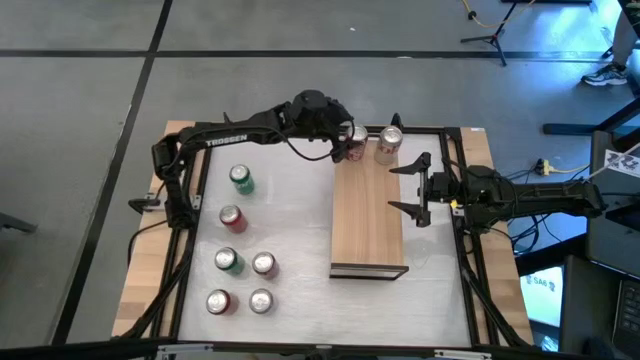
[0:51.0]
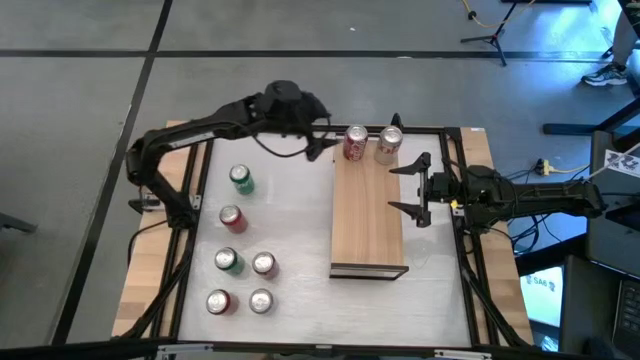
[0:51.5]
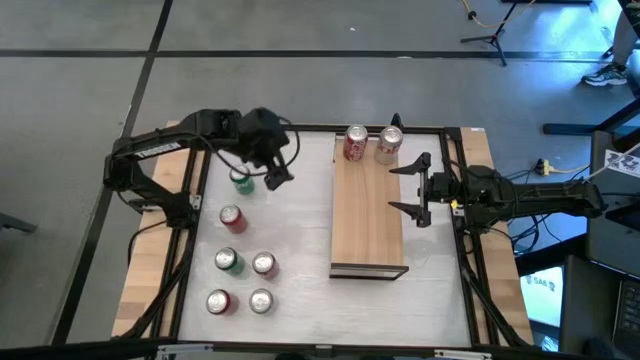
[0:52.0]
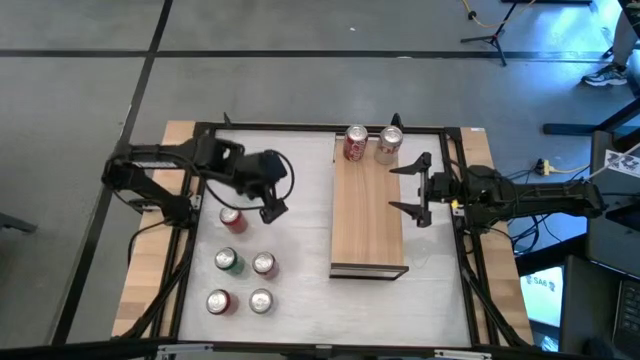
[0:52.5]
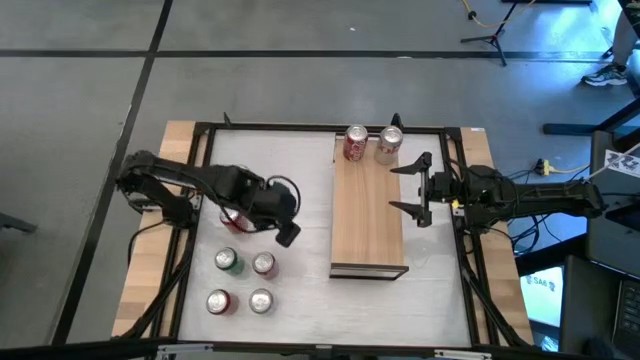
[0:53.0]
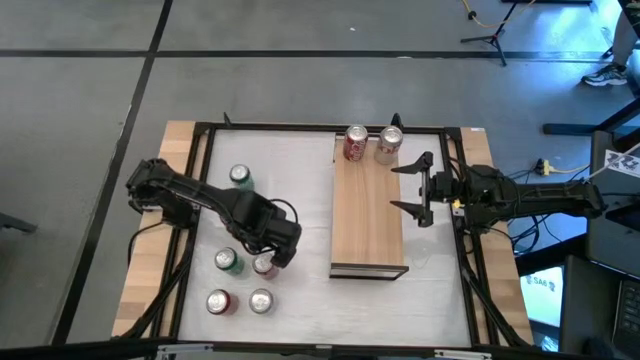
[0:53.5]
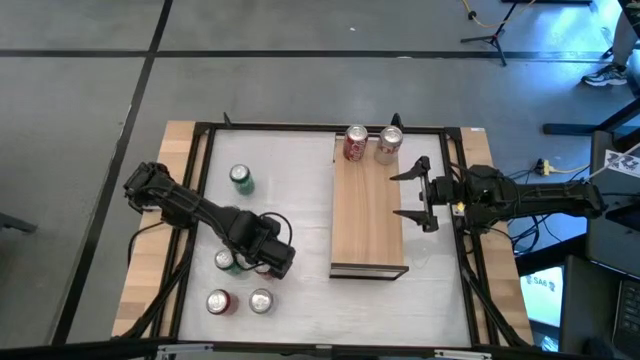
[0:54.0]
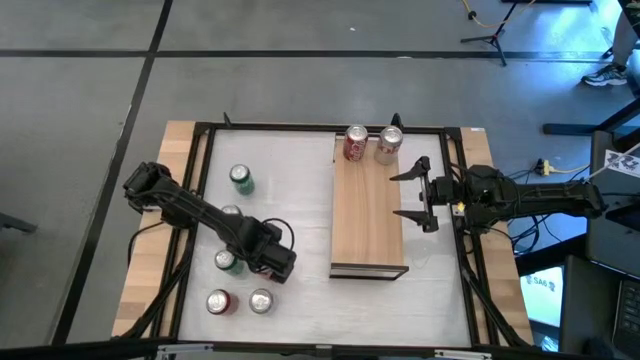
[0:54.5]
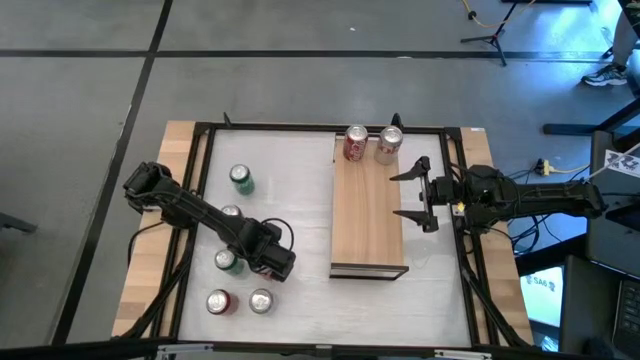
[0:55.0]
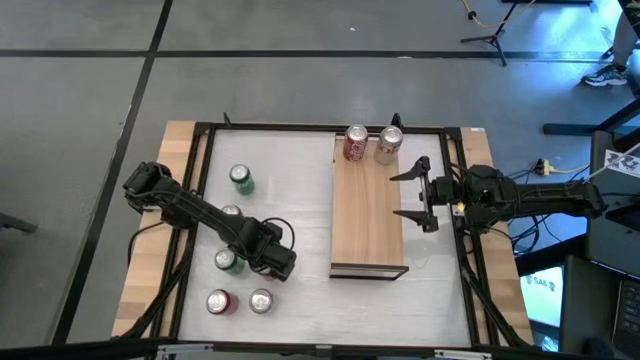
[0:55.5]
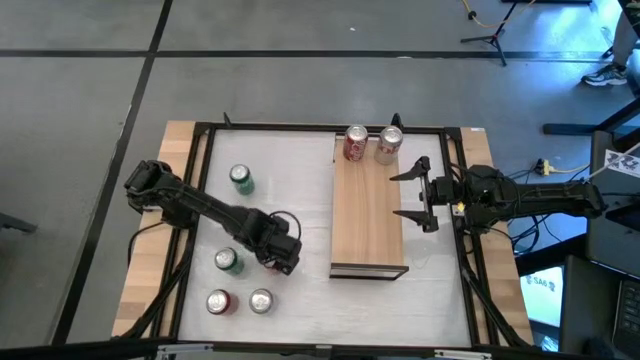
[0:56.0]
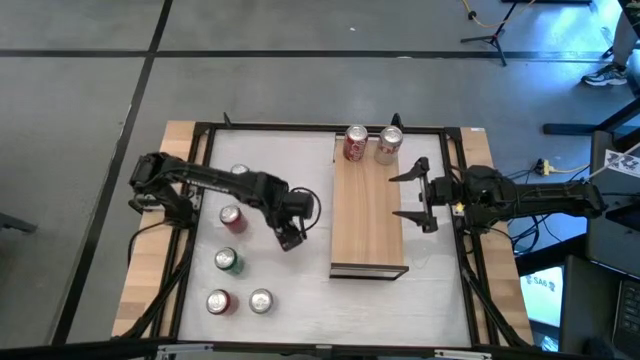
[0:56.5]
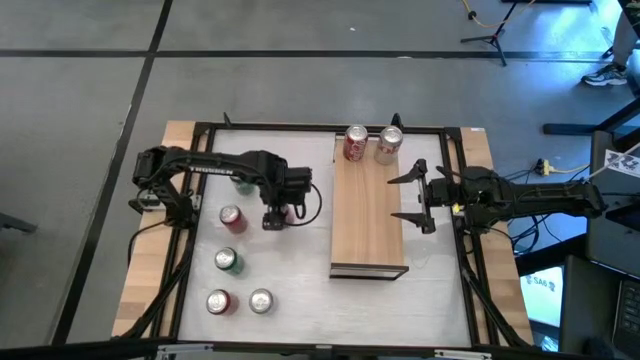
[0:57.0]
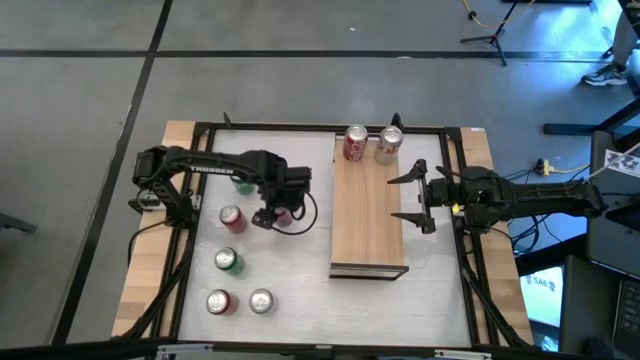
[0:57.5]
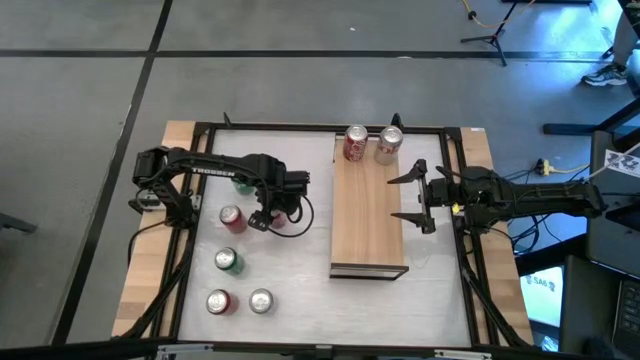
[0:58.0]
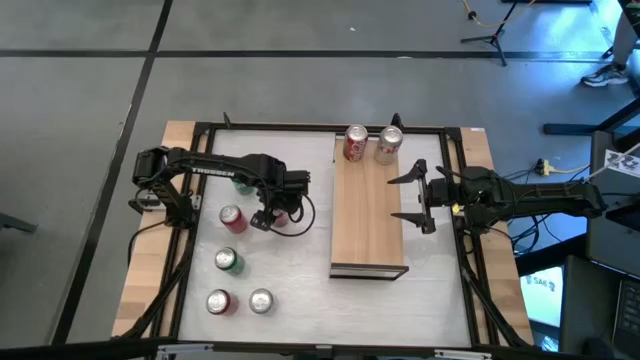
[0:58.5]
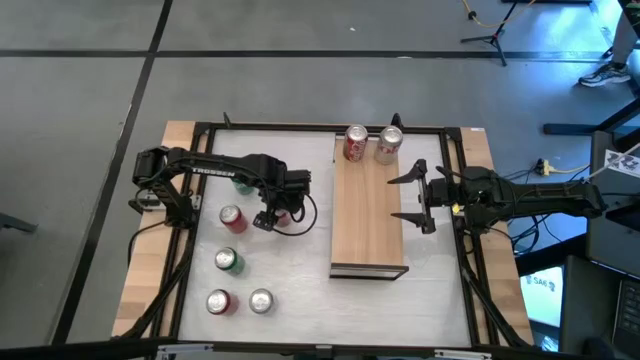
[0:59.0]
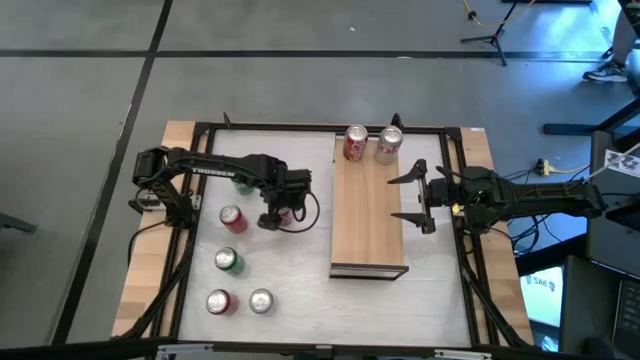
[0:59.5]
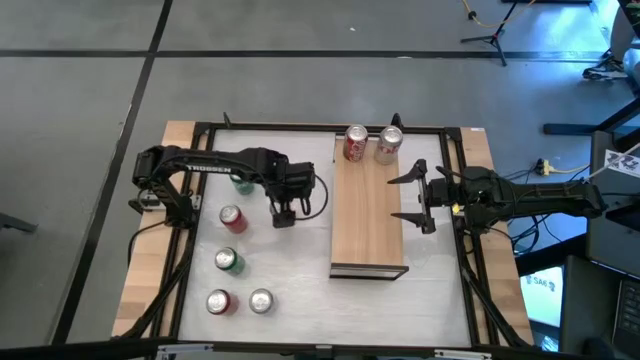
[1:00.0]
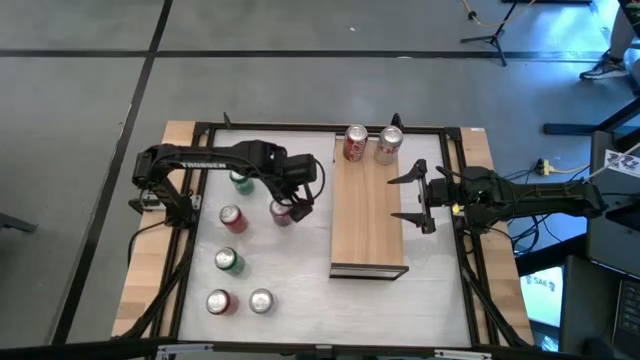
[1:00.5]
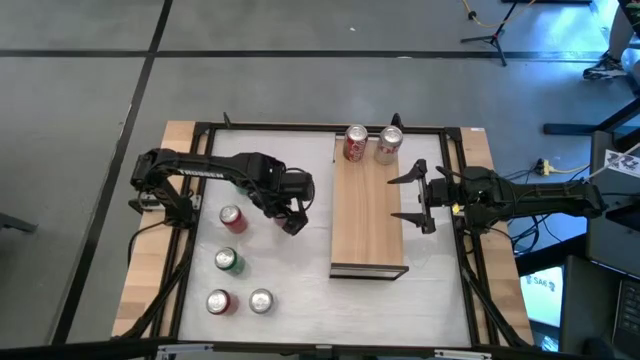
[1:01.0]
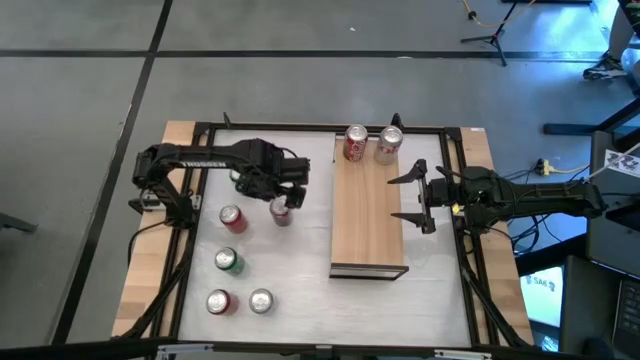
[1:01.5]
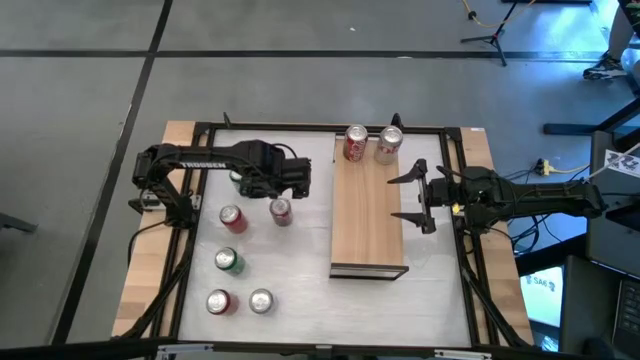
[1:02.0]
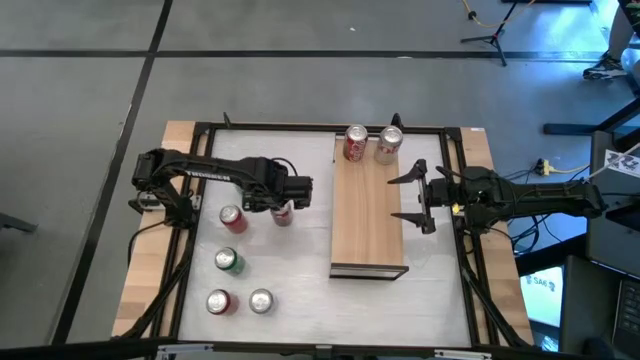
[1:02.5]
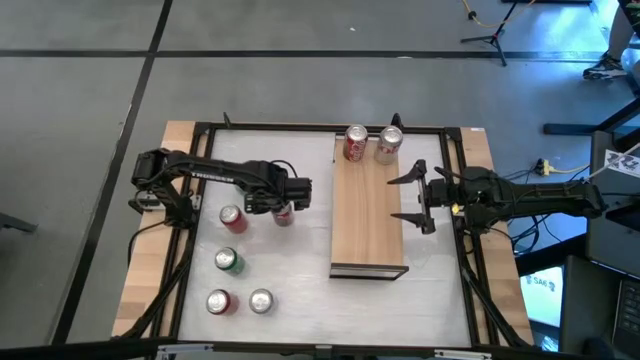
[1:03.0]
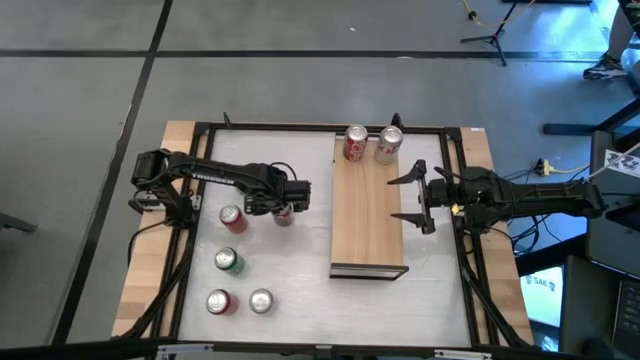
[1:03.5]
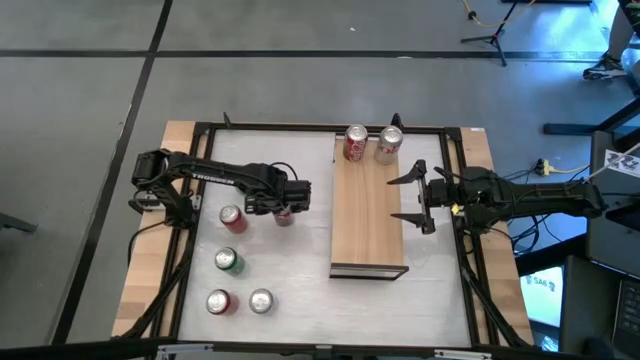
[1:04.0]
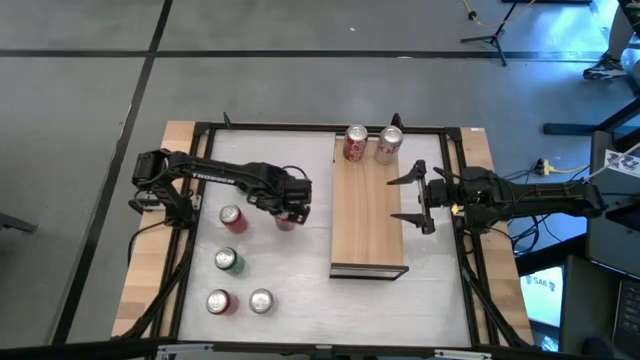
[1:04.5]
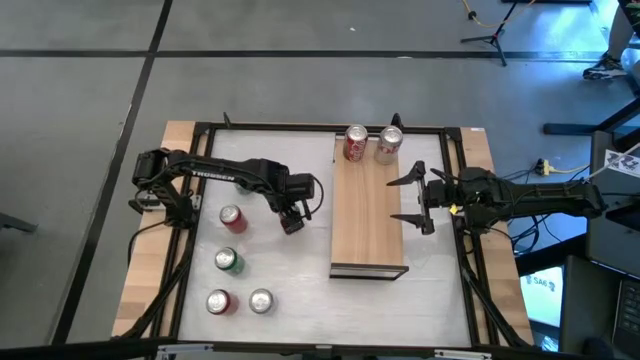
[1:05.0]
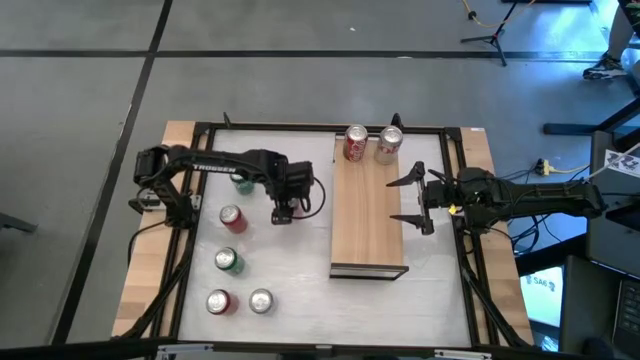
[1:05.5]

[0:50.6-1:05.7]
Task: Place canned beverage on shelf
Put the red white soda can on the shelf aligned with the other red white soda can

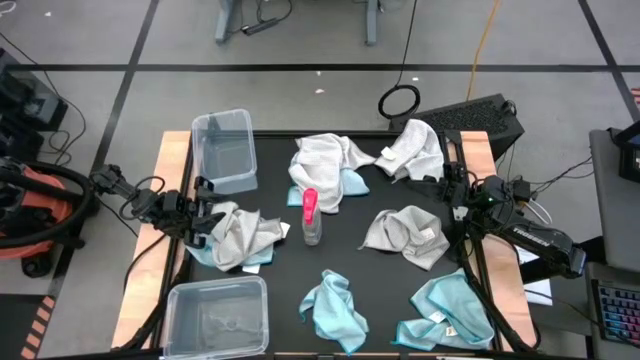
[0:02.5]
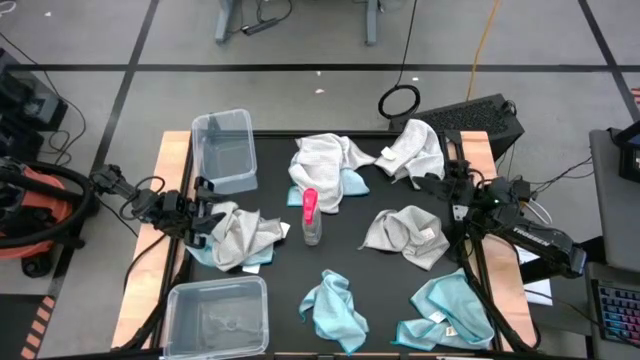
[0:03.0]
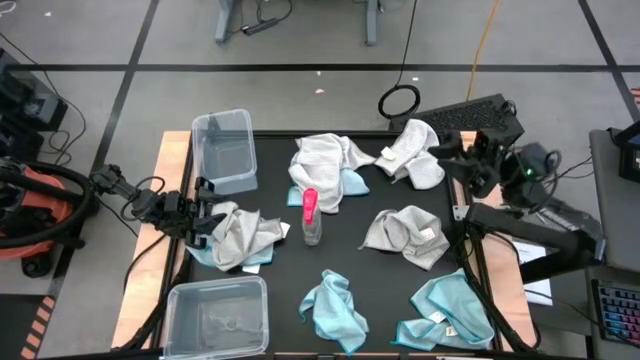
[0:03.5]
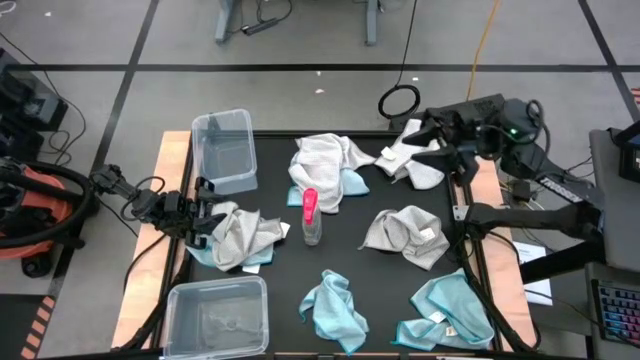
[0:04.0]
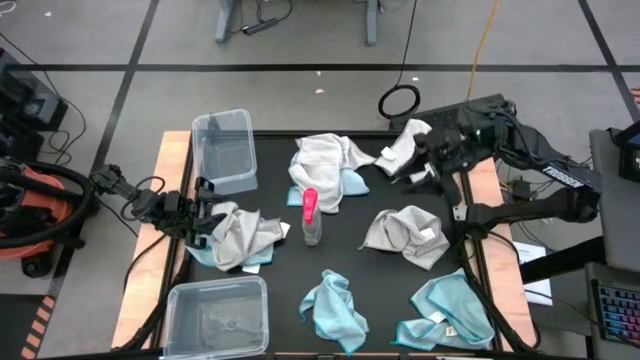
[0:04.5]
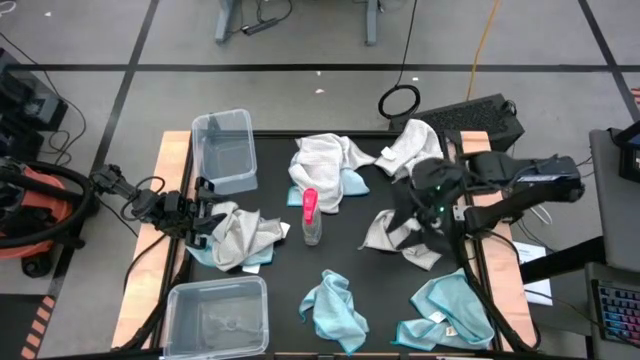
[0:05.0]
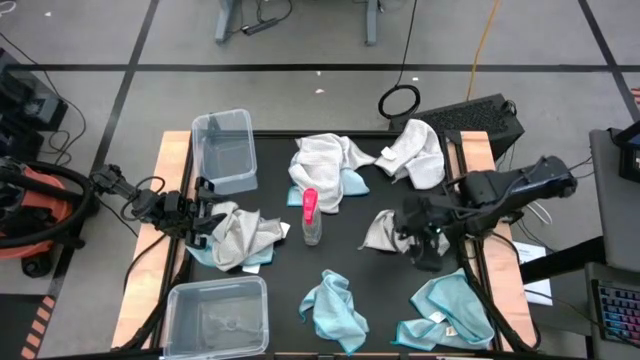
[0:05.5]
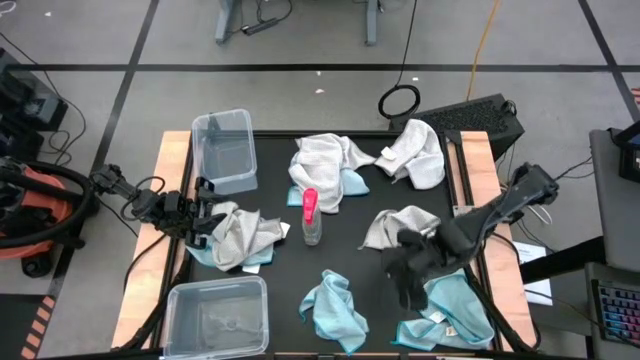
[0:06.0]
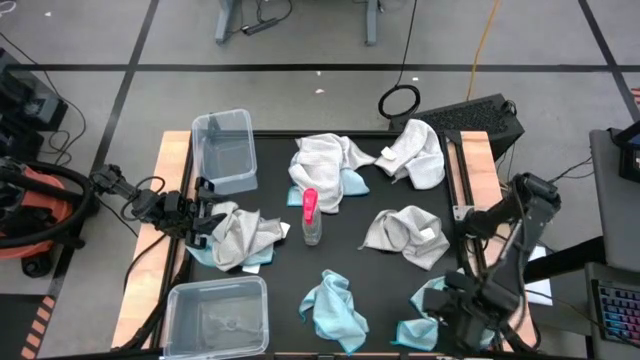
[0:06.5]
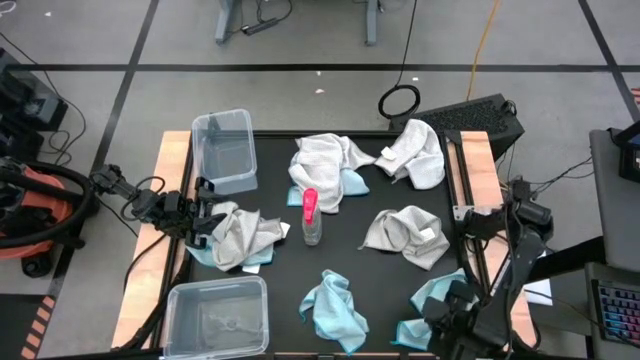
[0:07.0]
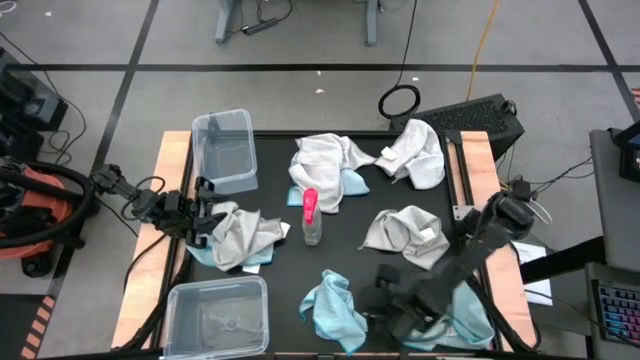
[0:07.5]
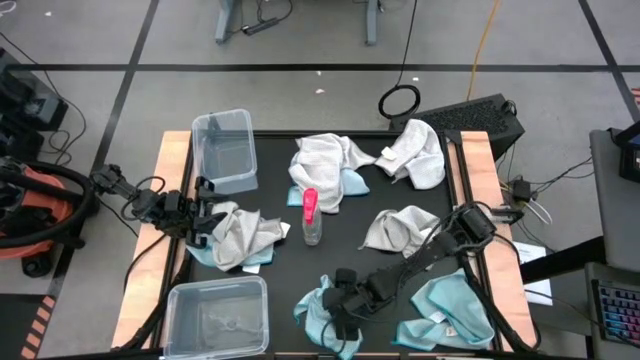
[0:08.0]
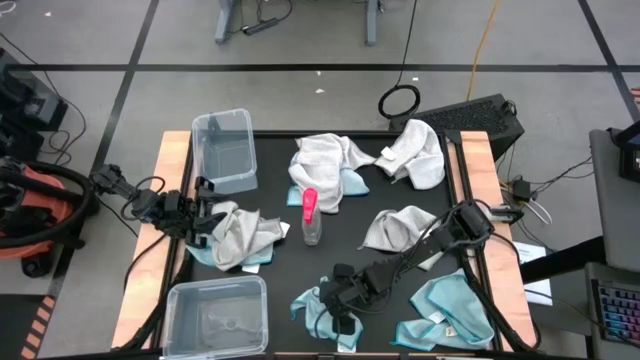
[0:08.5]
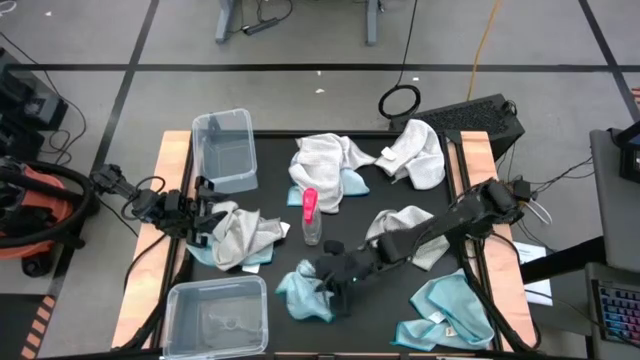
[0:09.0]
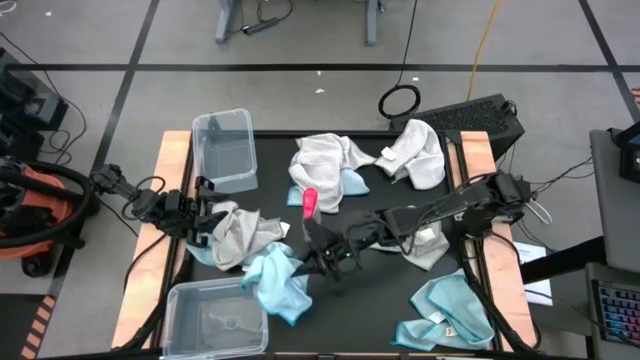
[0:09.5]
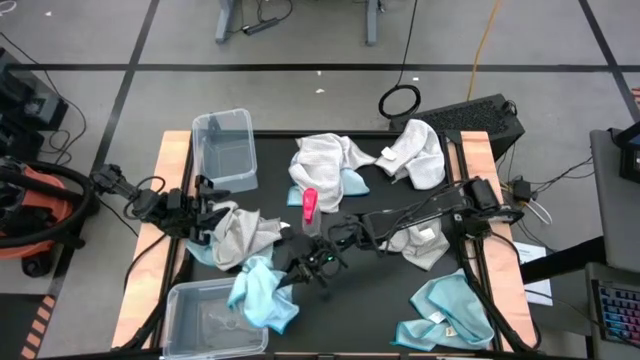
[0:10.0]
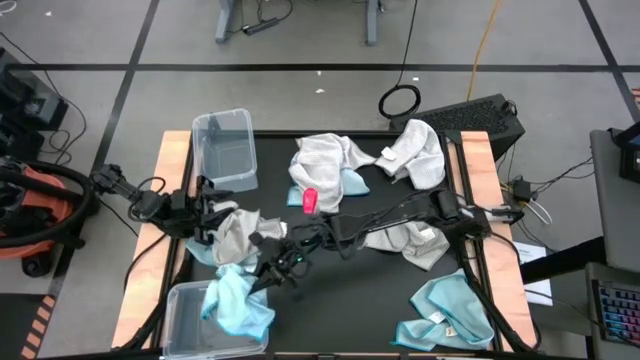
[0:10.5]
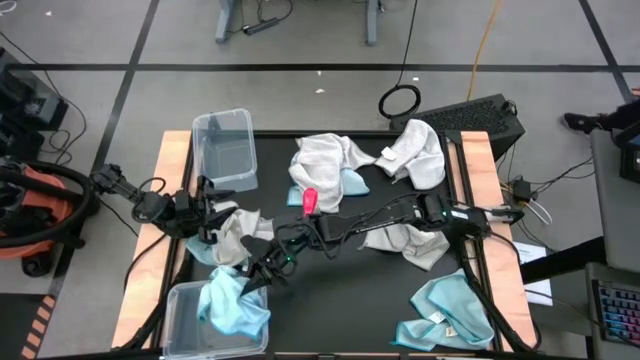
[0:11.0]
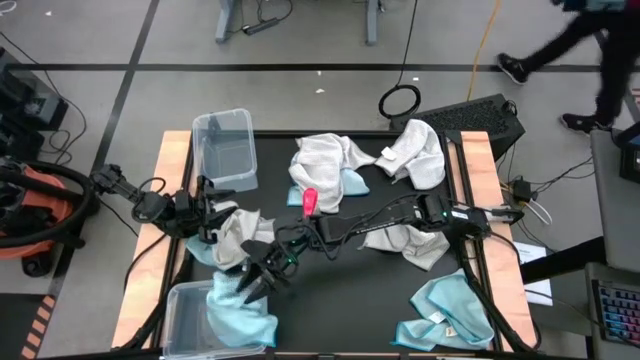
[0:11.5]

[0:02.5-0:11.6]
Task: Sort microfiber towel by color & place in baskets
Put the blue towel into the bottom transparent bin
